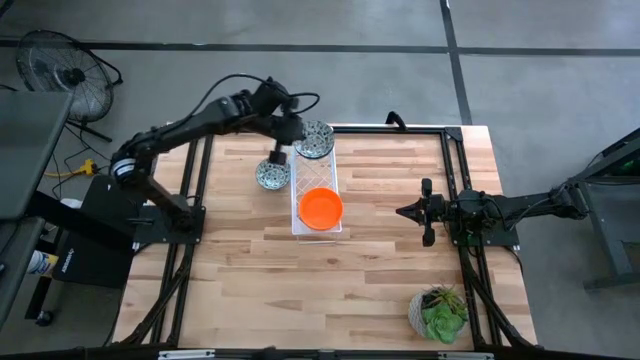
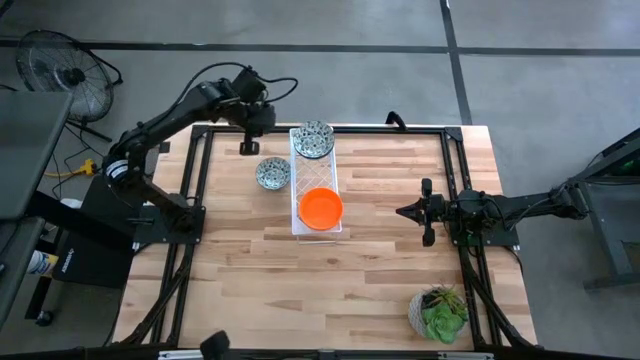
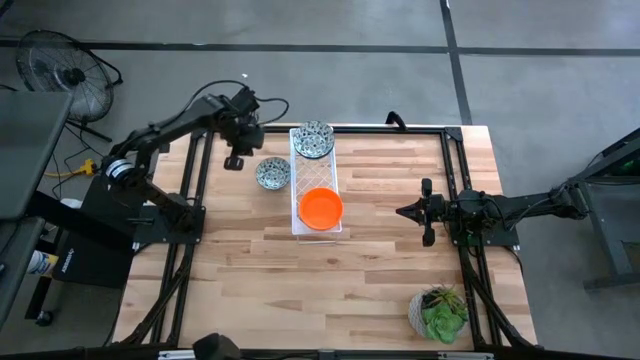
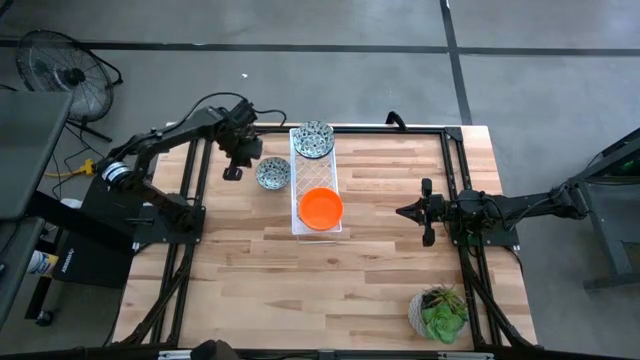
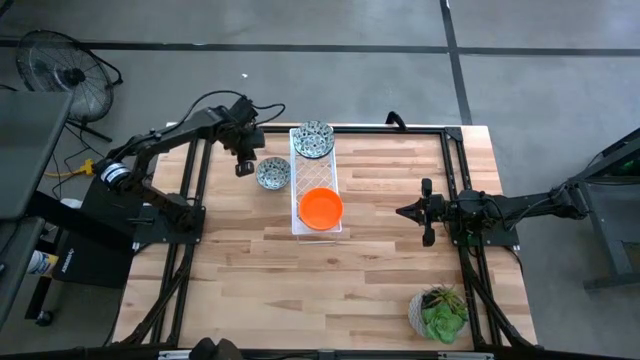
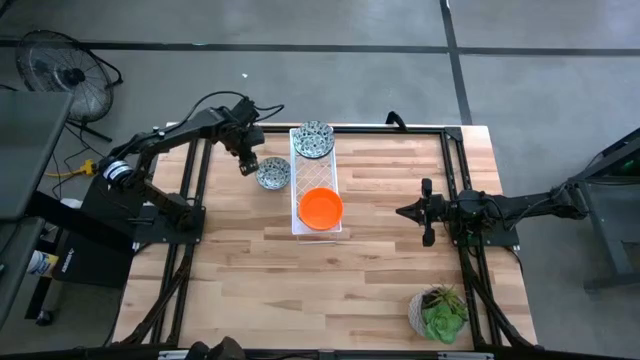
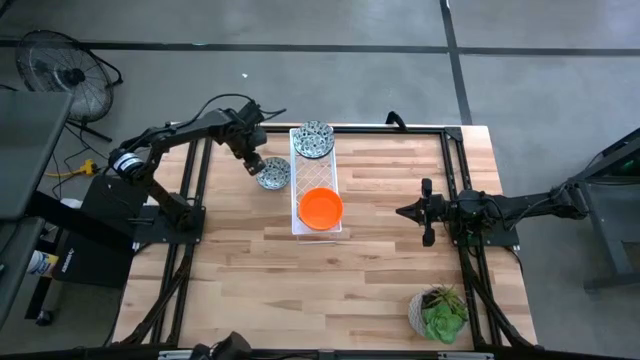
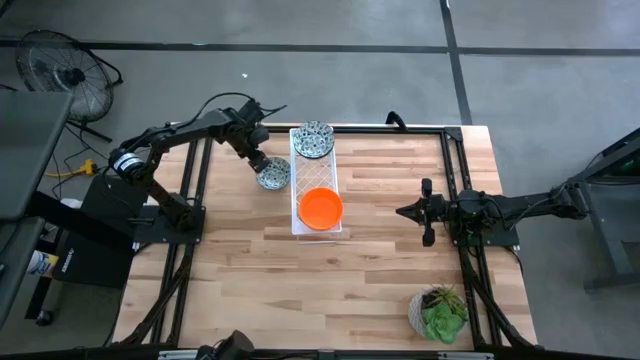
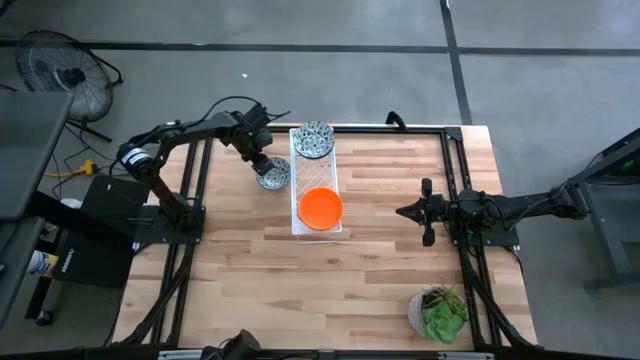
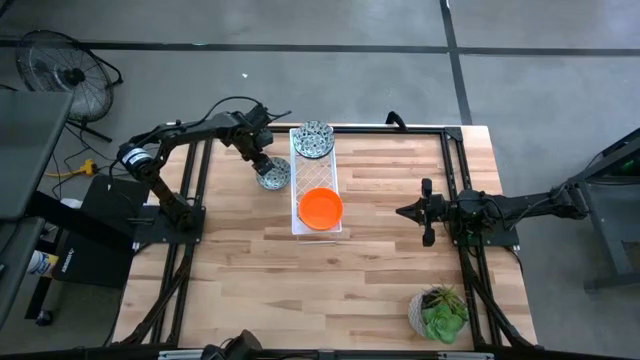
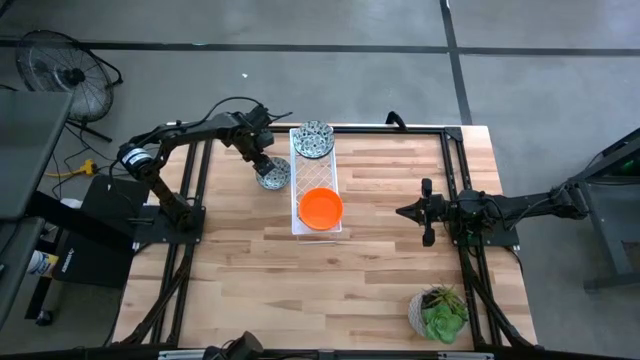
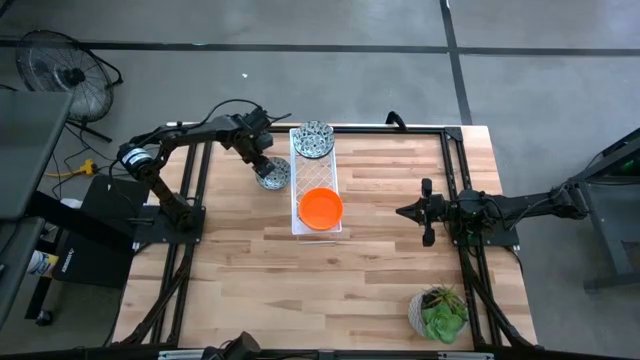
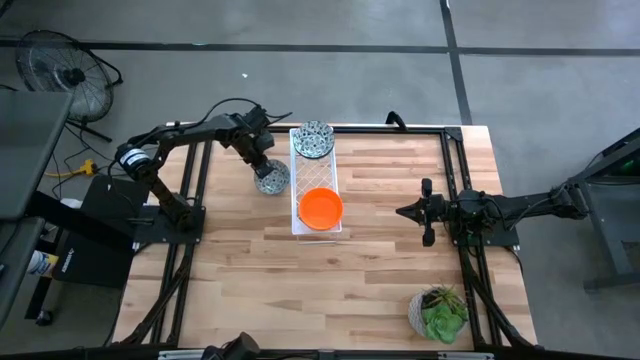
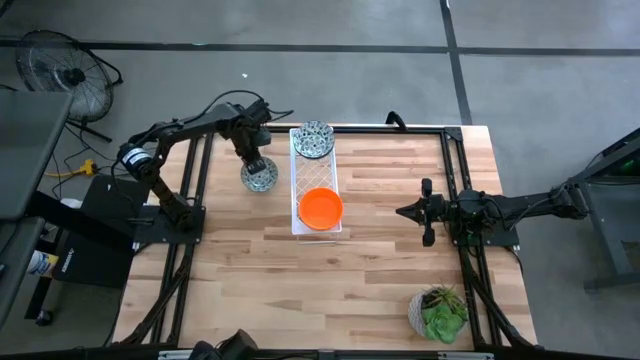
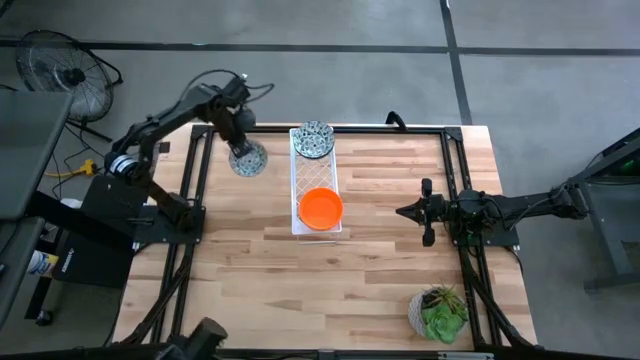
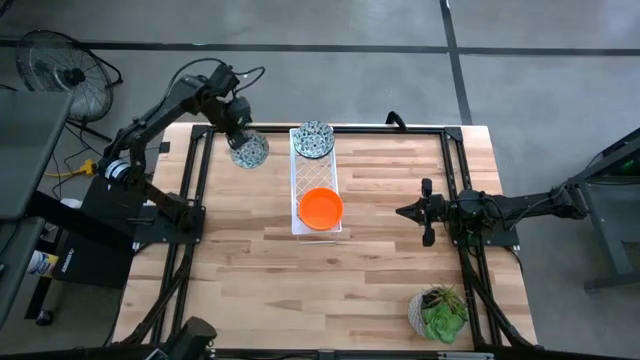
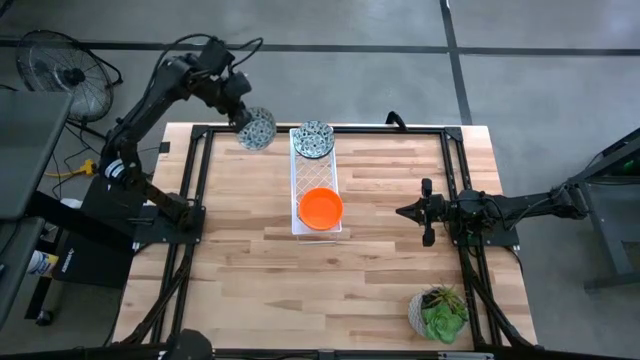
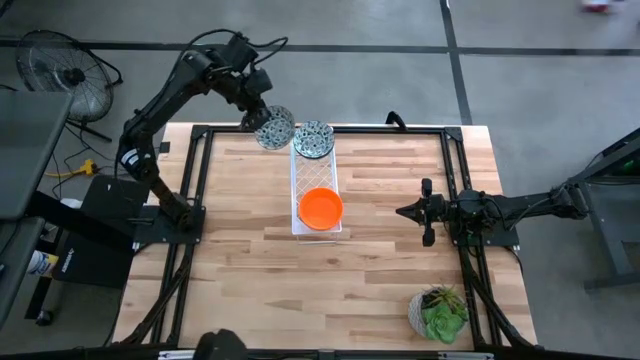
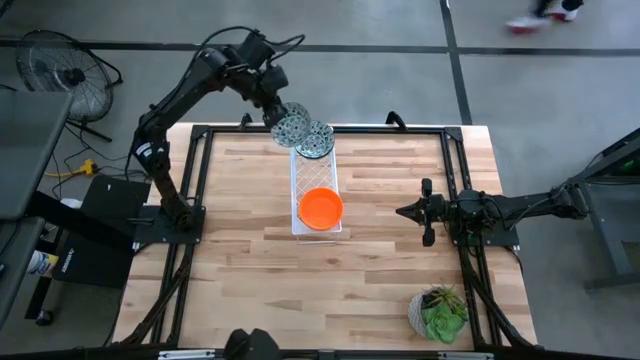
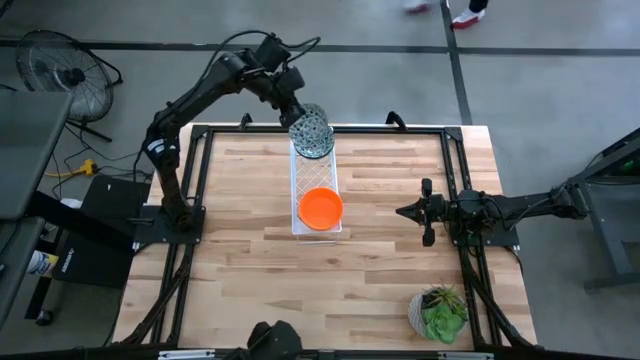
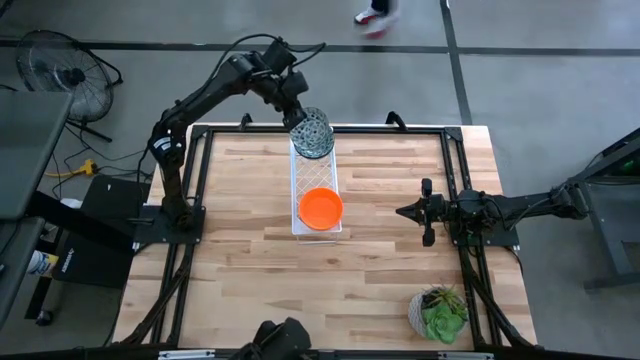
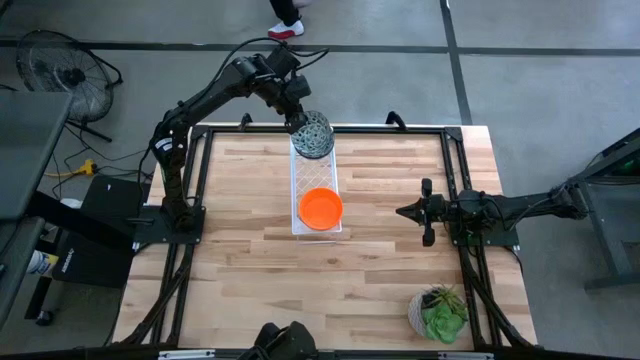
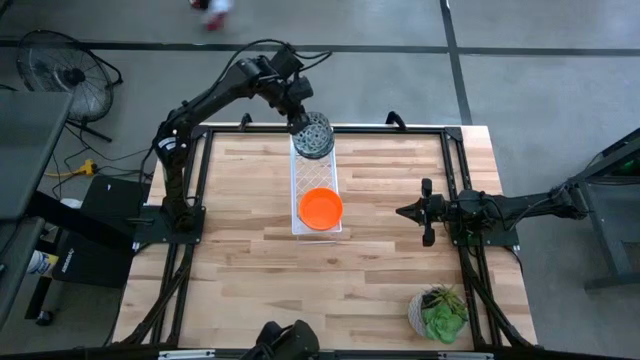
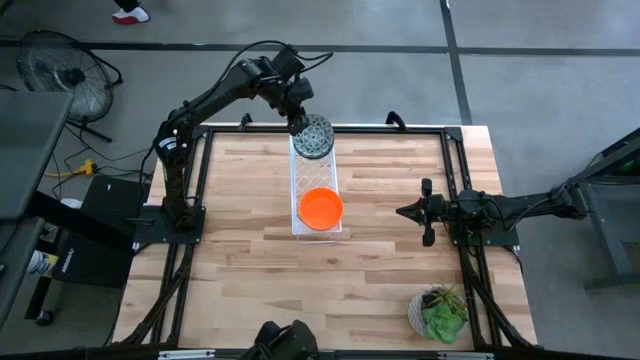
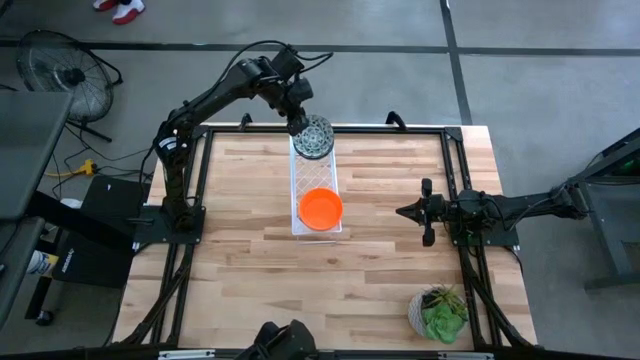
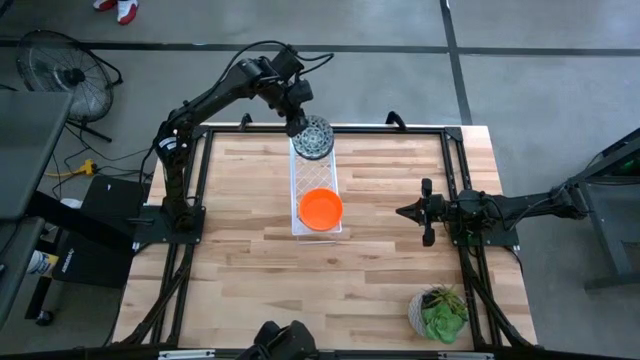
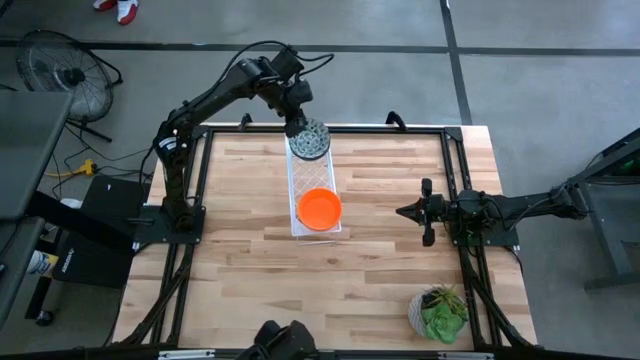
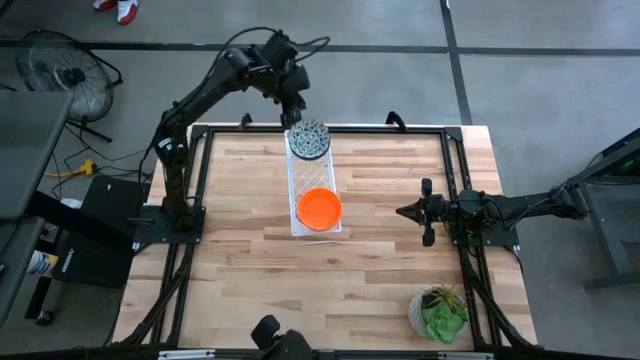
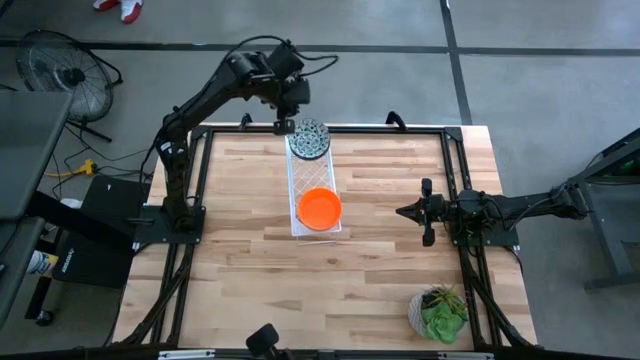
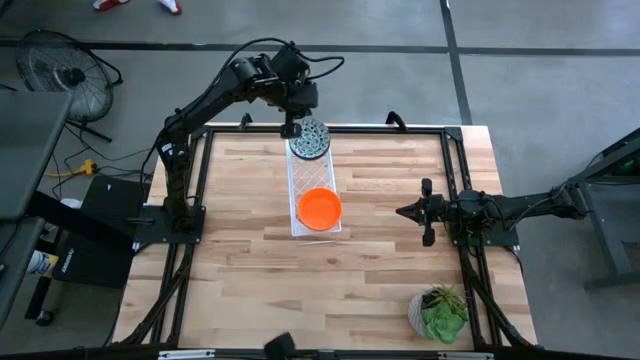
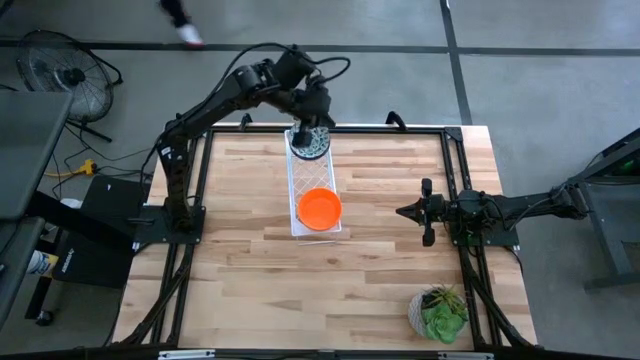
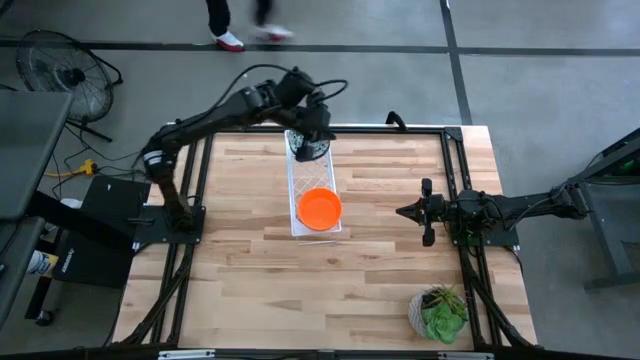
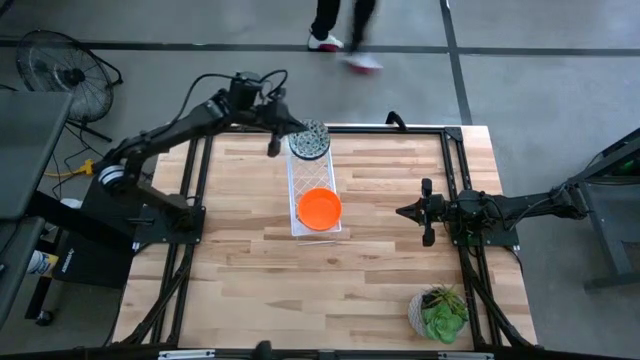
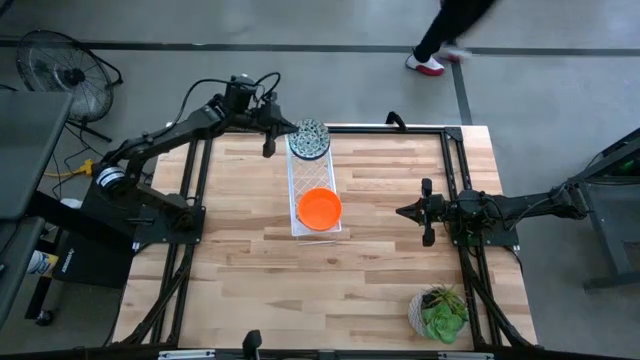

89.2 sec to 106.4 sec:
Task: Pick & Place Mini bowls
Stack the white bowl on the white bowls on the shelf

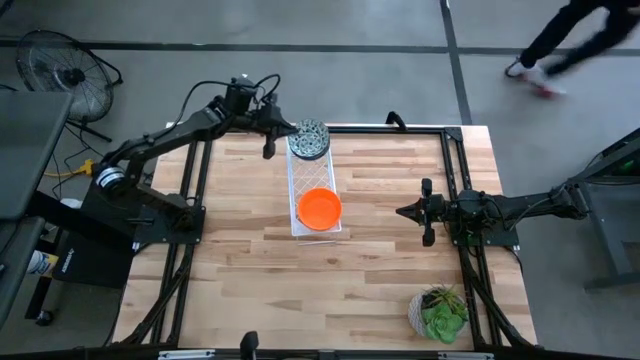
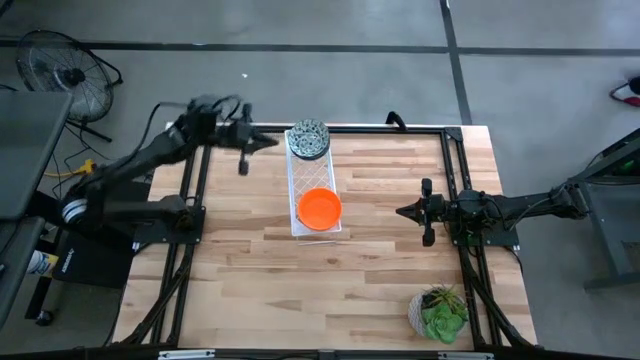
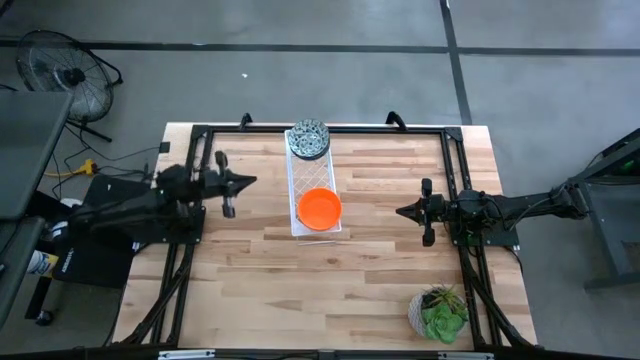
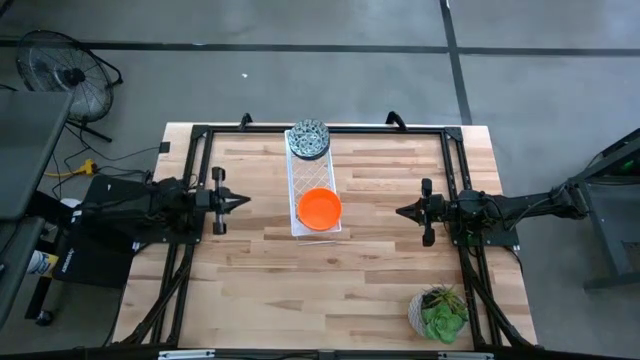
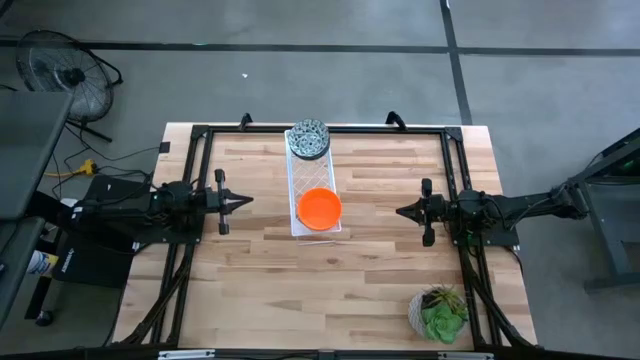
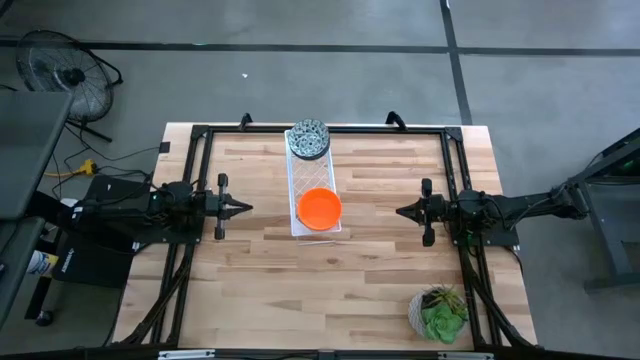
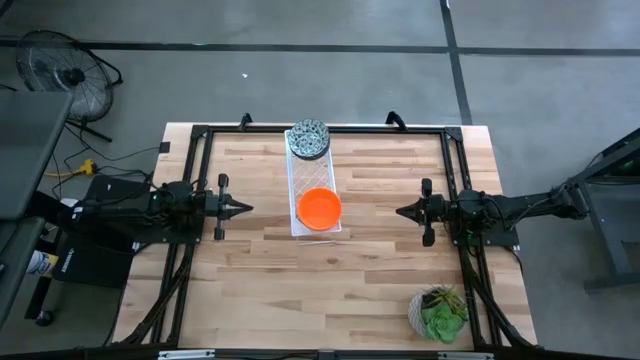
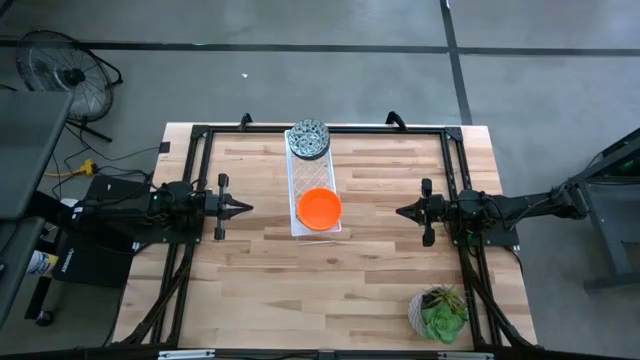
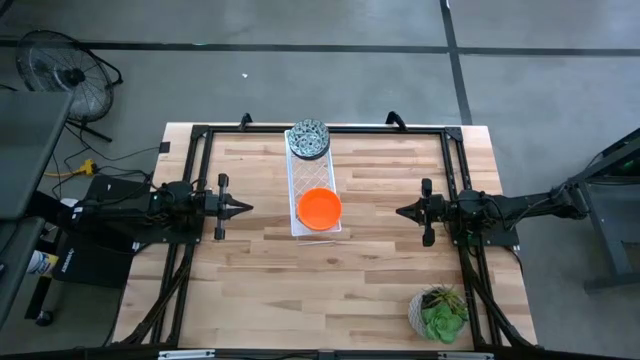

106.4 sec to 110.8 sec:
Return to Home Position
